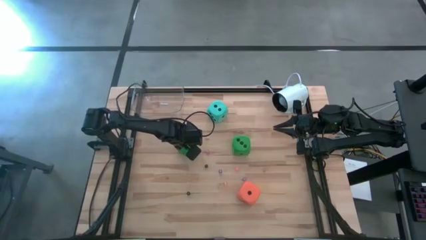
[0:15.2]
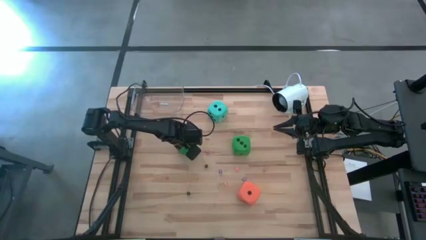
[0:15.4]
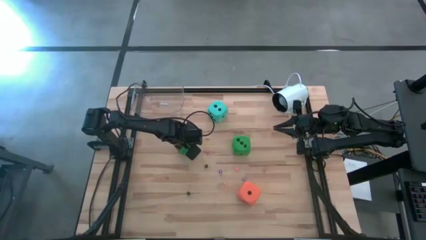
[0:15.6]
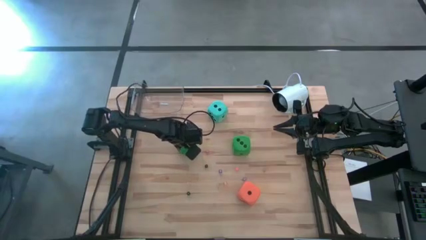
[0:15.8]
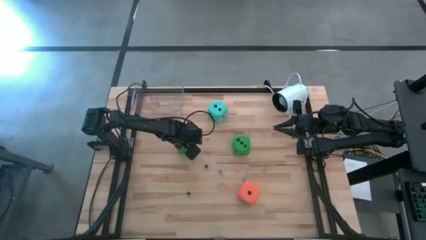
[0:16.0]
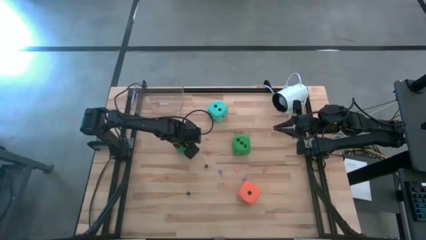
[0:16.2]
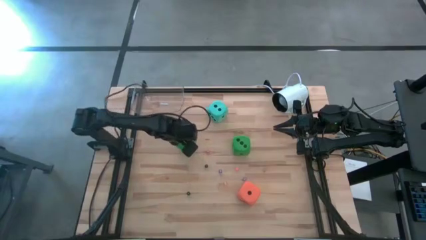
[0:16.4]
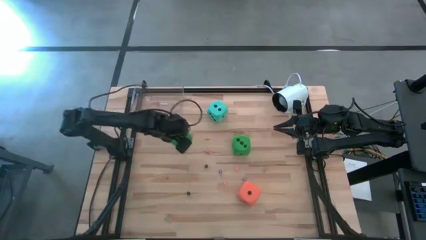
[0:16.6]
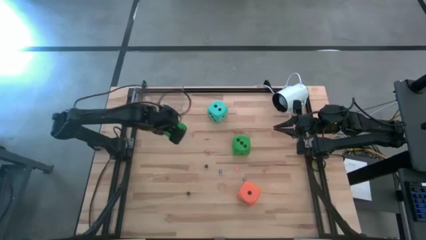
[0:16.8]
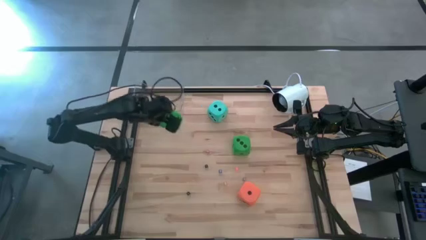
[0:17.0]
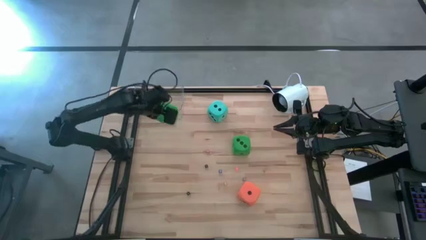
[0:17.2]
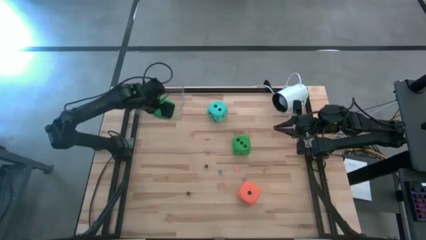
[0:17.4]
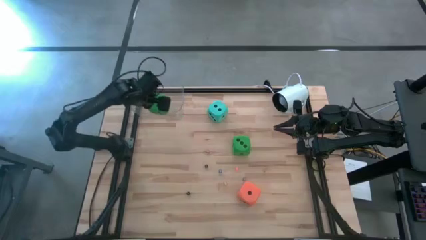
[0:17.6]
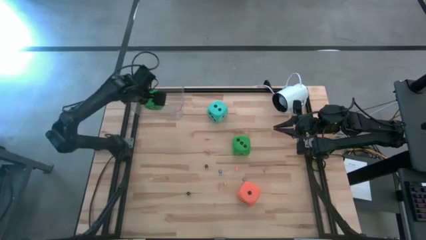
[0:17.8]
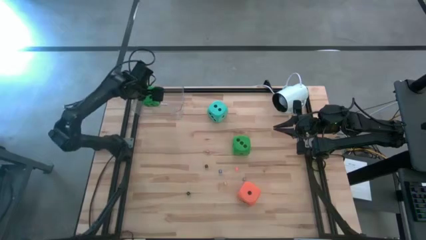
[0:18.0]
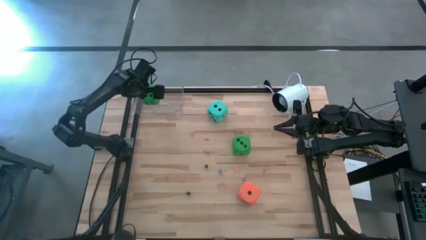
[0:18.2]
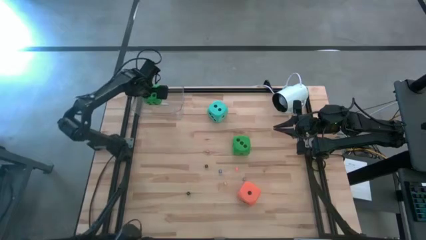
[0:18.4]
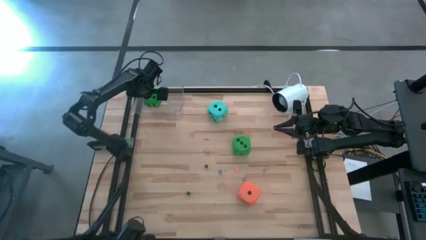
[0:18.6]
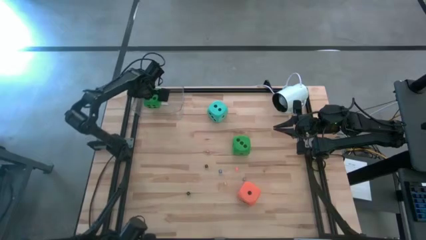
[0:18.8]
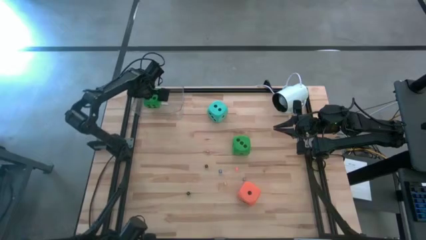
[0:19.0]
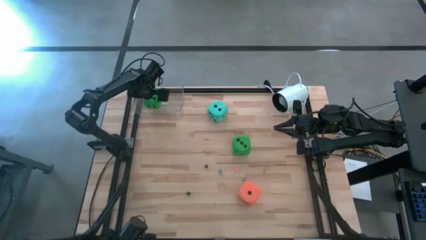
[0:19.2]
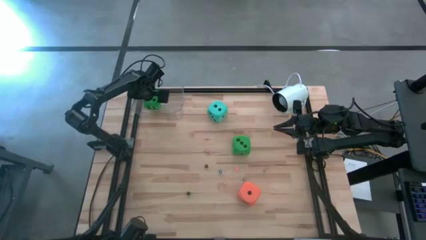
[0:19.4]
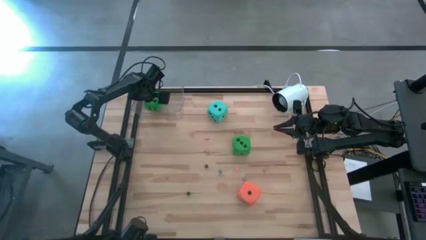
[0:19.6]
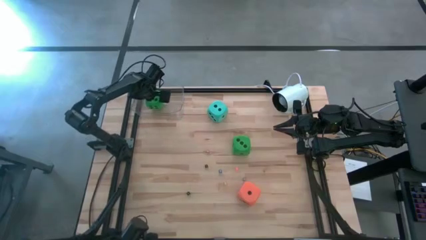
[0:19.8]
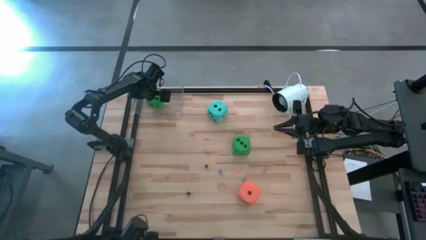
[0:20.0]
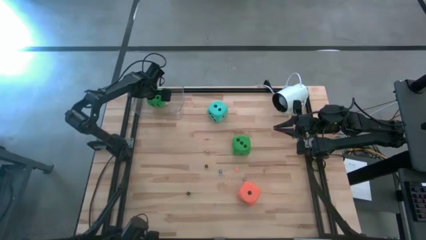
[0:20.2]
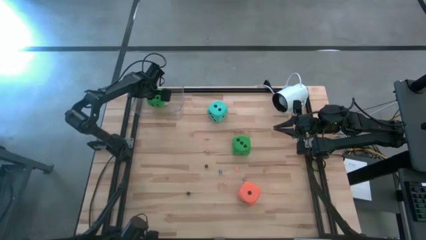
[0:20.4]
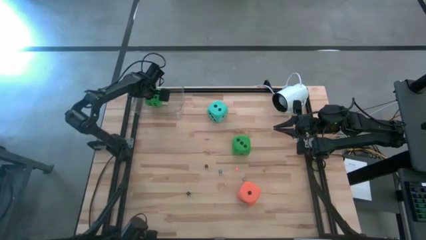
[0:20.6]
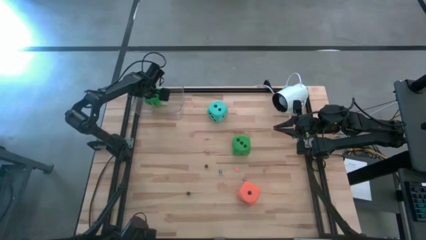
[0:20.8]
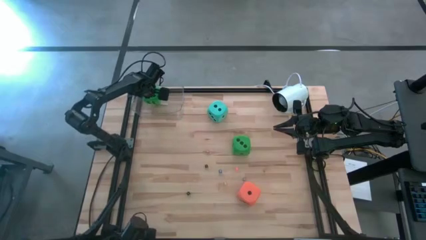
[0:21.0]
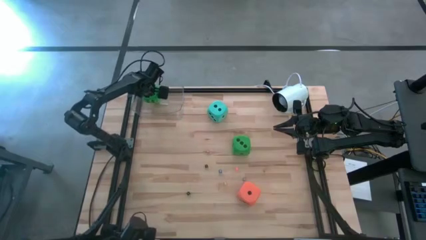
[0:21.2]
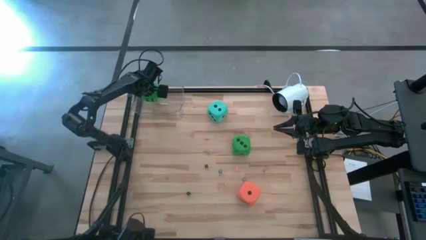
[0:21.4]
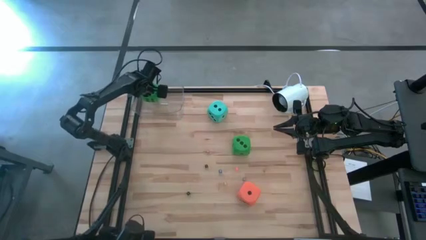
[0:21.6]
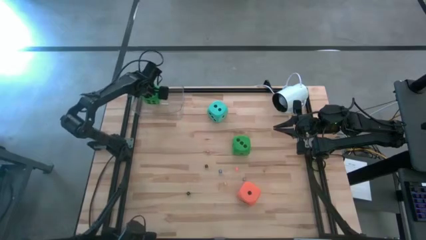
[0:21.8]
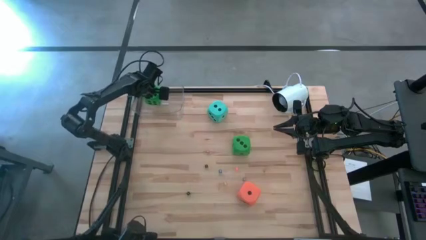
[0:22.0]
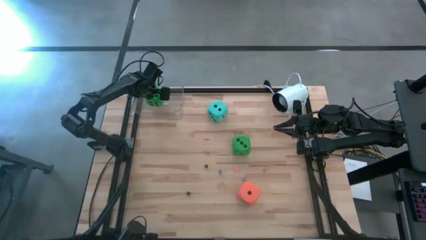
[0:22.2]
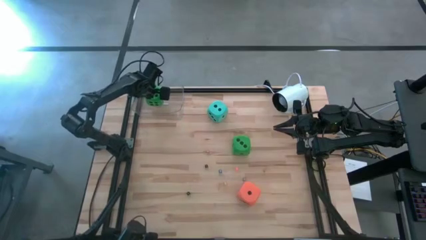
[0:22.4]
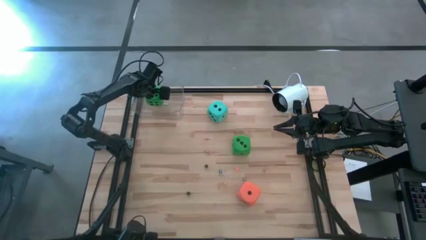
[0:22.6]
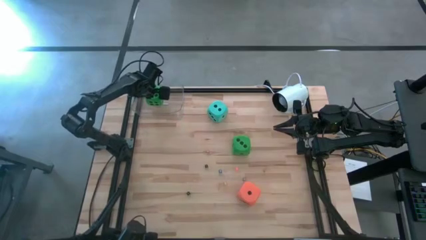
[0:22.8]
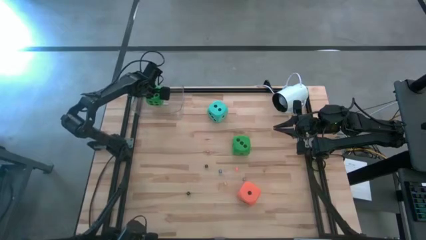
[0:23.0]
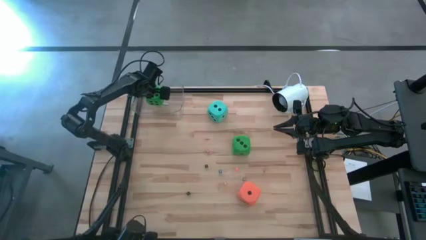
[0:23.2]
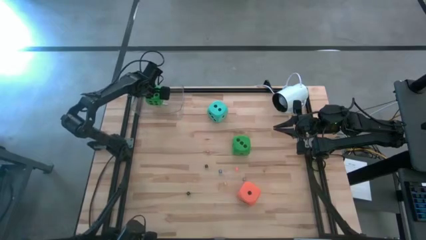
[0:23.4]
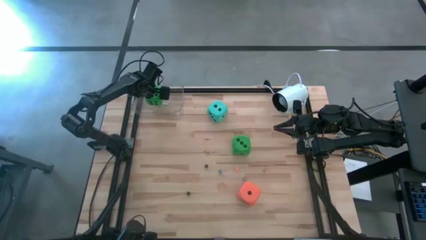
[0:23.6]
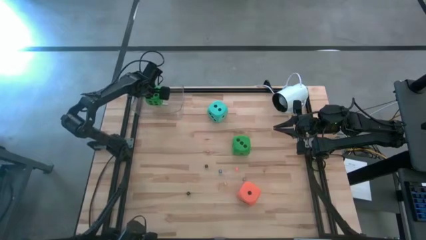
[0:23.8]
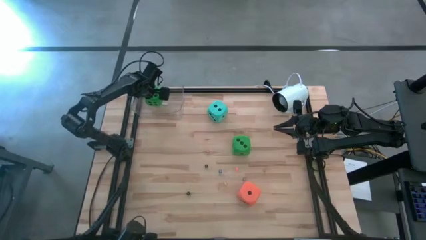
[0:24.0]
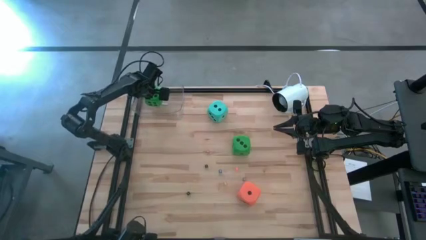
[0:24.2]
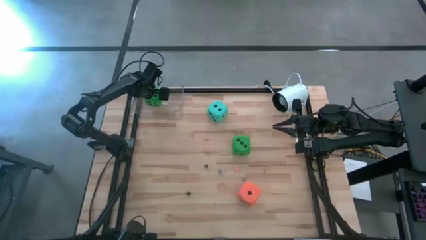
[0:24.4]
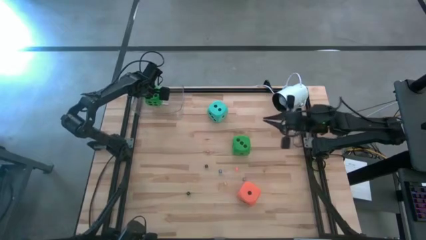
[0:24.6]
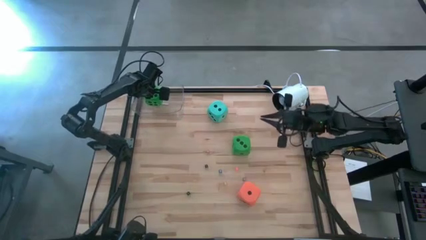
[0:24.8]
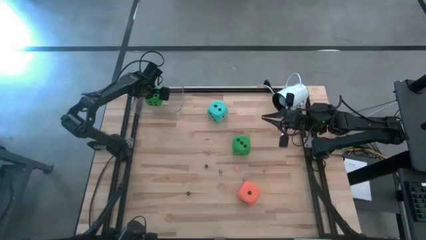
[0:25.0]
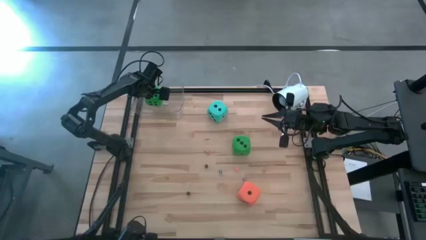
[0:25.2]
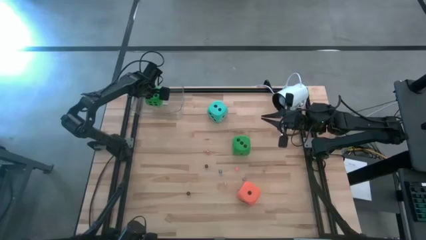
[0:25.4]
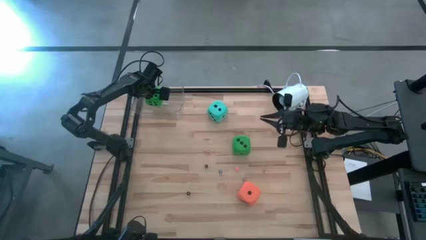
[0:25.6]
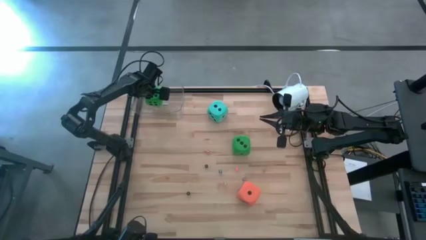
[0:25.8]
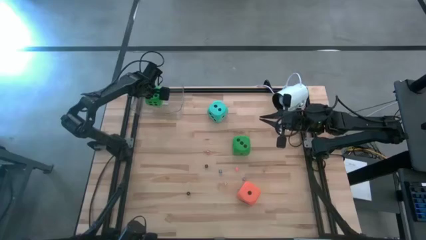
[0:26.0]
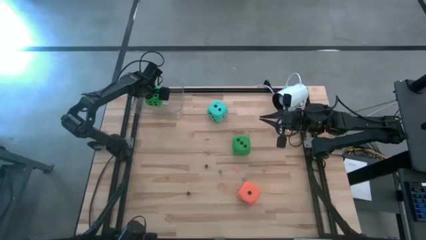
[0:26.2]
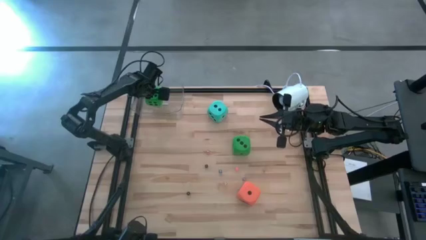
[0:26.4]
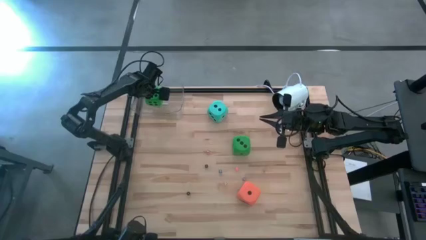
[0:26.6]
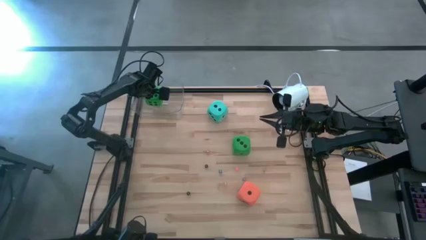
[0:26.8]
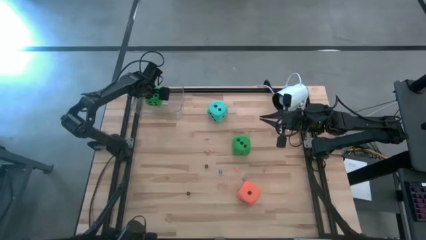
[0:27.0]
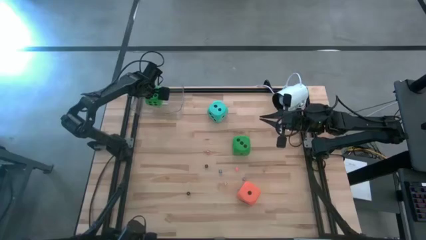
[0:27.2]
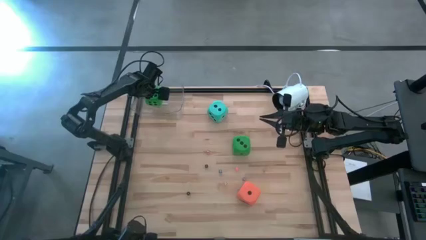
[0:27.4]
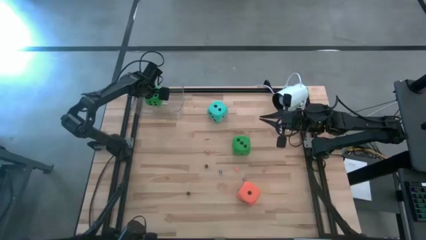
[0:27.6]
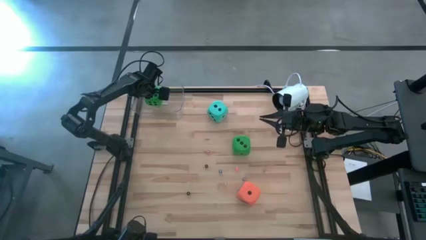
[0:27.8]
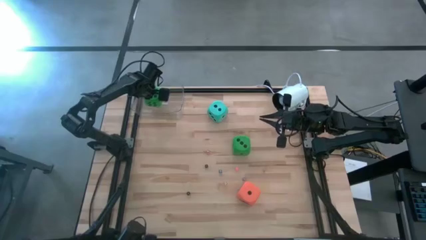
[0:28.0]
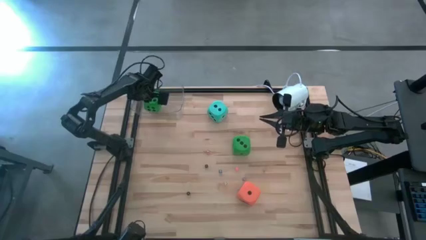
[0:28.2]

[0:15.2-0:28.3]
Task: Pick & Place Dice
Put the left large green die into the transparent bin

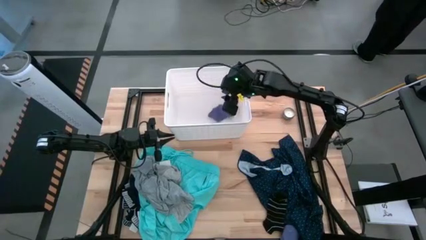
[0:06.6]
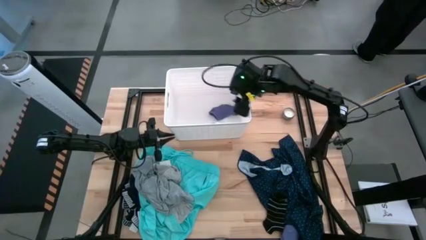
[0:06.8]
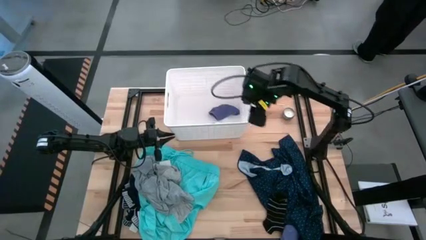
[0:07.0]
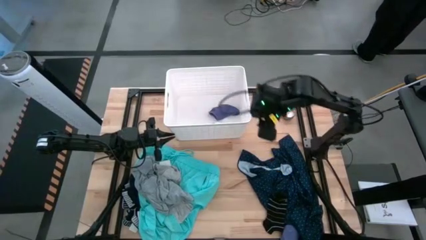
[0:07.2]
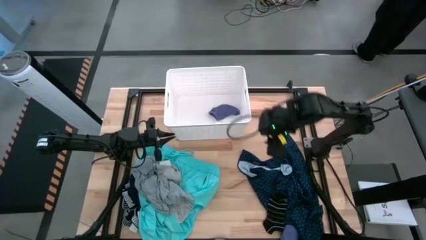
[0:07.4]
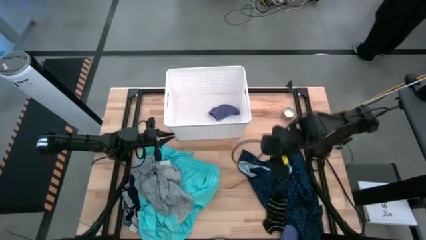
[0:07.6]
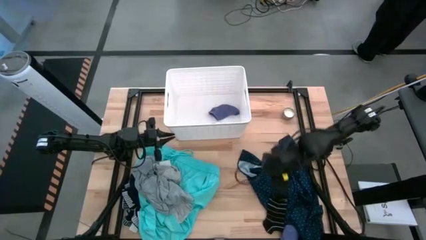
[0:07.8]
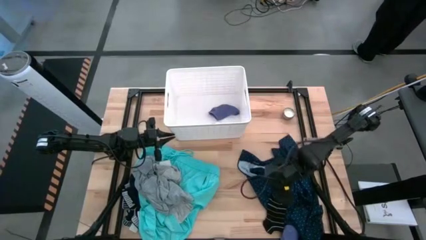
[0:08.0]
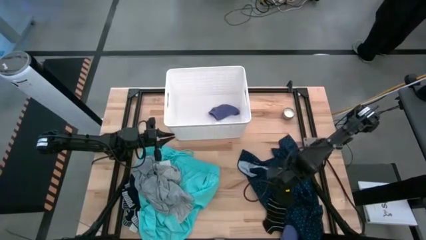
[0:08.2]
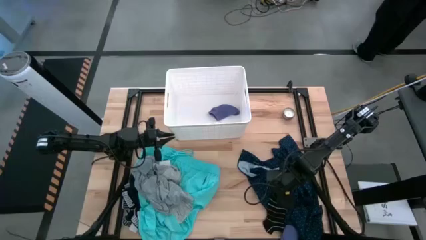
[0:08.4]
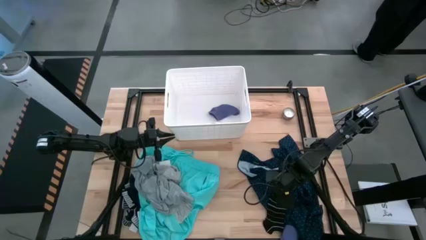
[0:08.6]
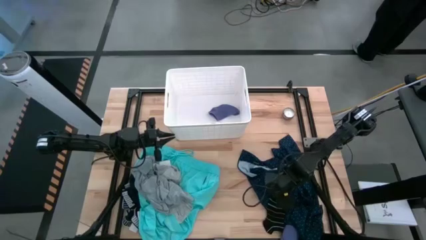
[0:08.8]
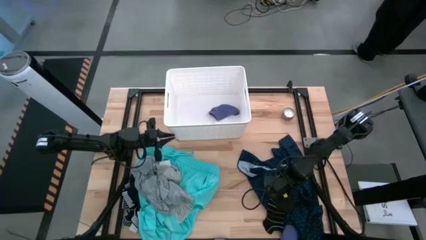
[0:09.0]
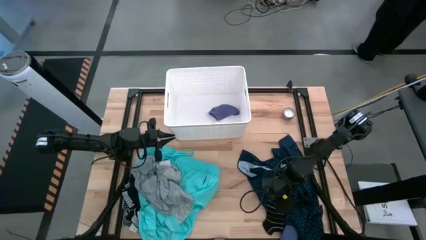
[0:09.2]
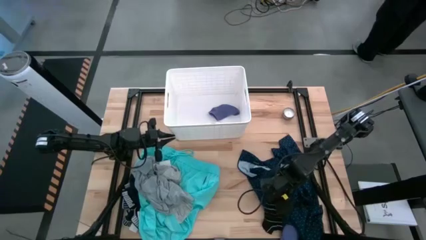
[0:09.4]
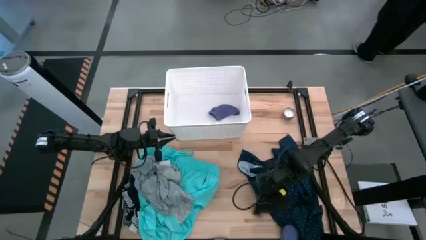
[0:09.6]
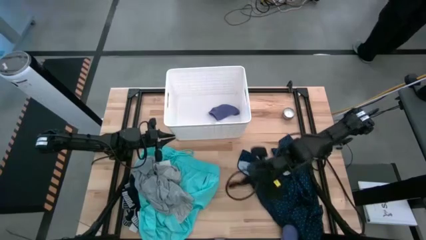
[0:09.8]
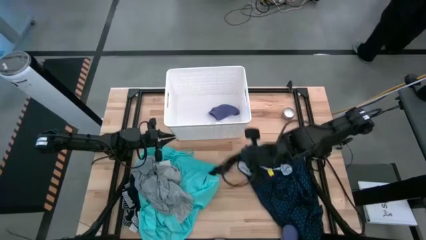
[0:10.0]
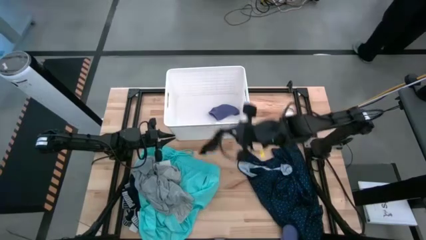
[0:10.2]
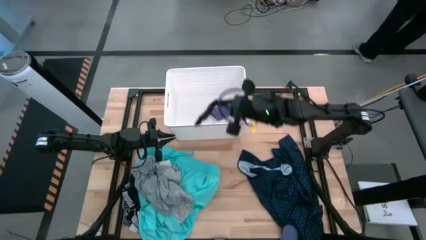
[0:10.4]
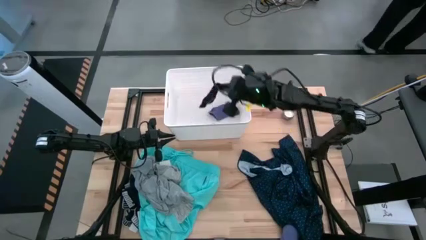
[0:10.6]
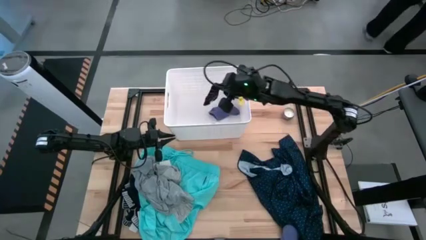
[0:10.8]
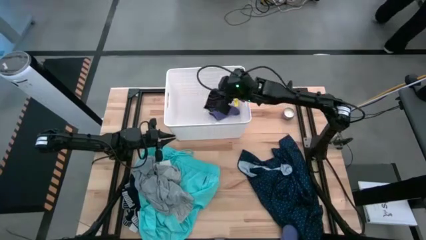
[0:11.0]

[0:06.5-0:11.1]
Task: Sort clothes
Put the black sock into the white bin
